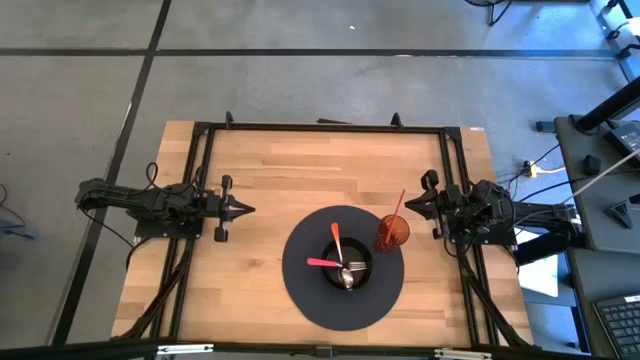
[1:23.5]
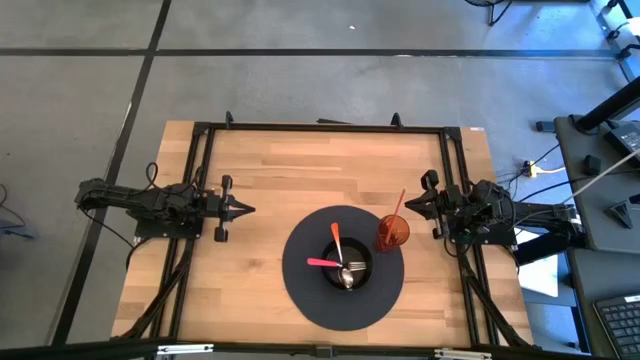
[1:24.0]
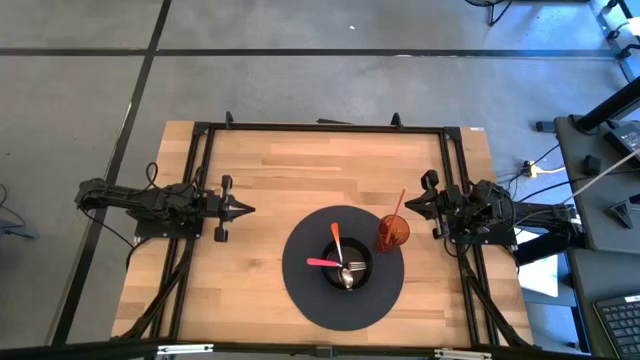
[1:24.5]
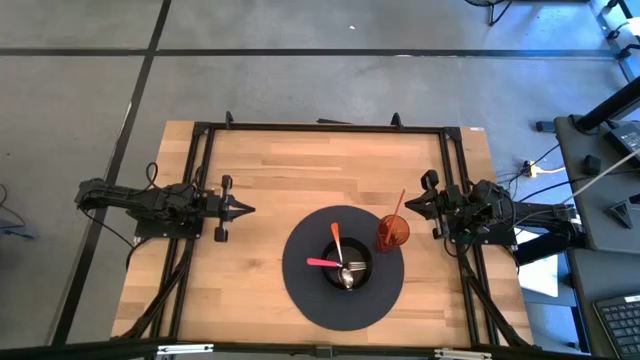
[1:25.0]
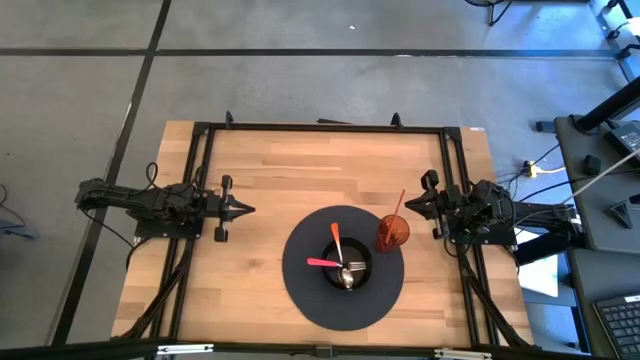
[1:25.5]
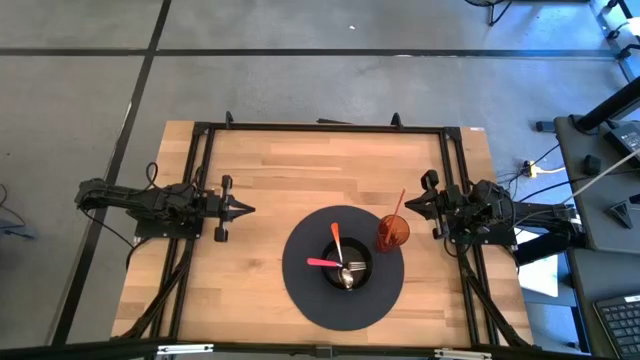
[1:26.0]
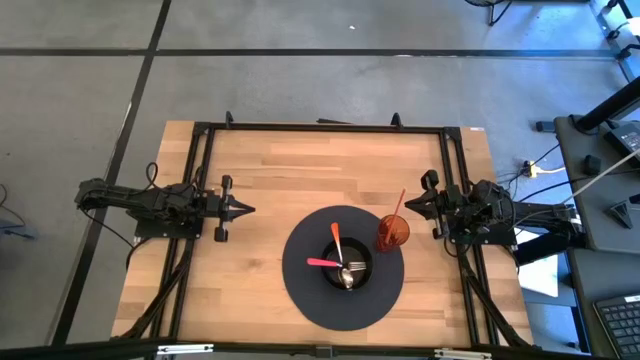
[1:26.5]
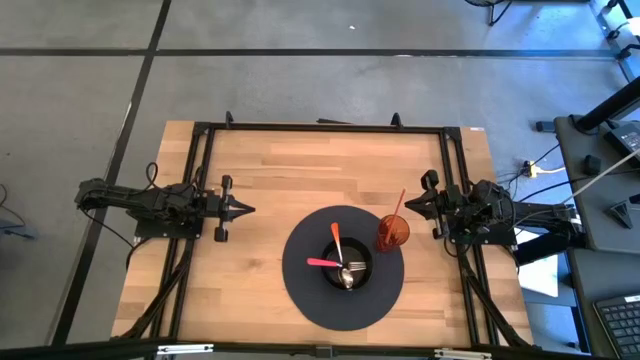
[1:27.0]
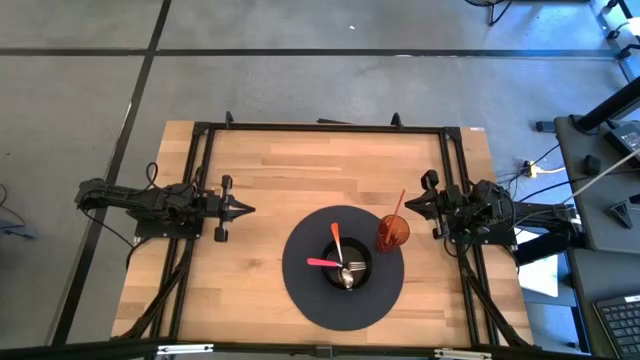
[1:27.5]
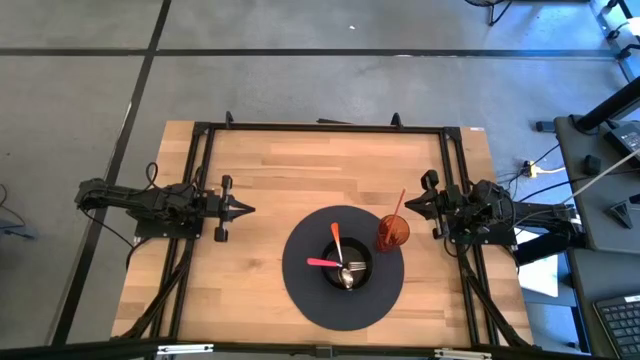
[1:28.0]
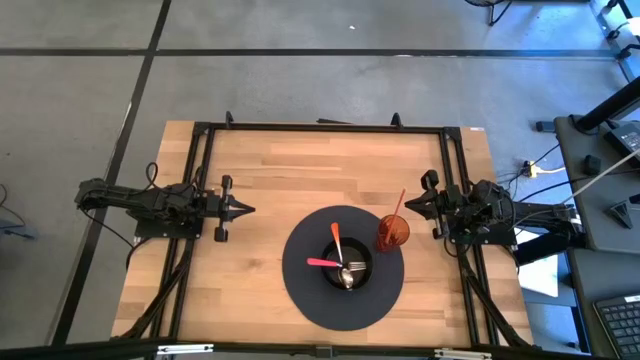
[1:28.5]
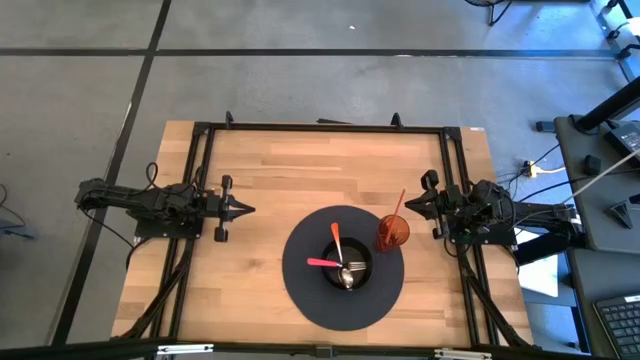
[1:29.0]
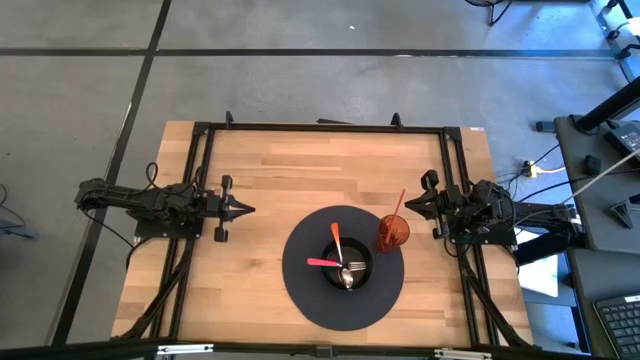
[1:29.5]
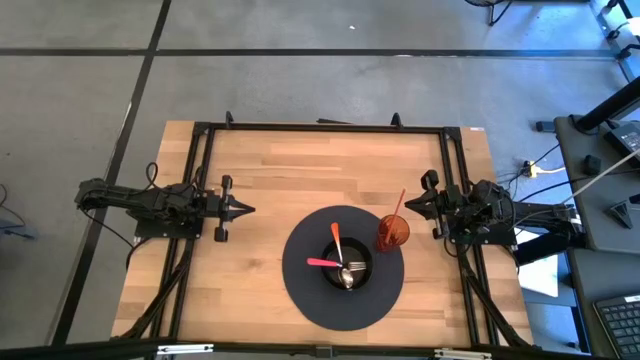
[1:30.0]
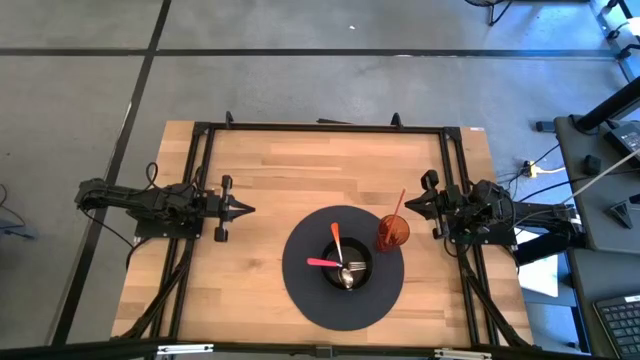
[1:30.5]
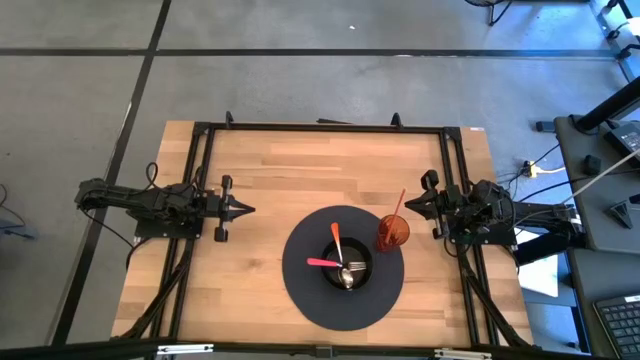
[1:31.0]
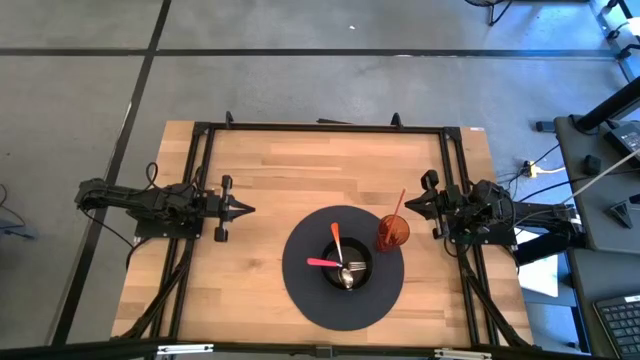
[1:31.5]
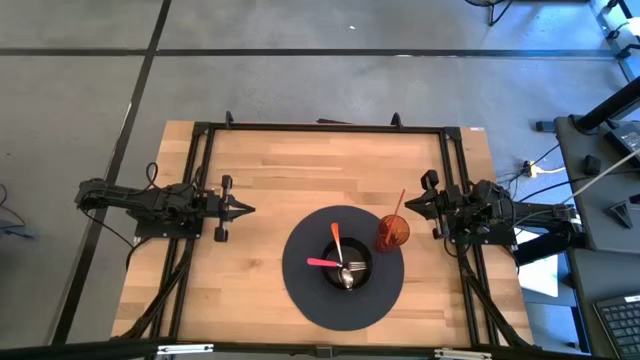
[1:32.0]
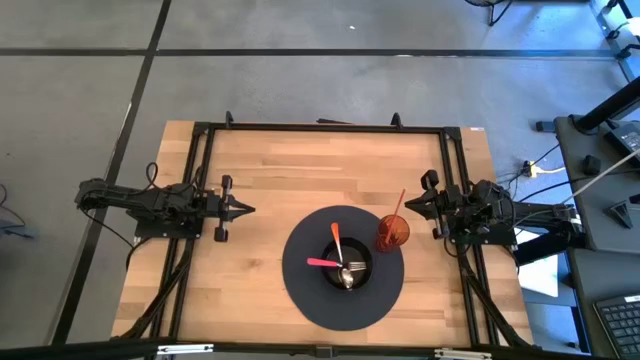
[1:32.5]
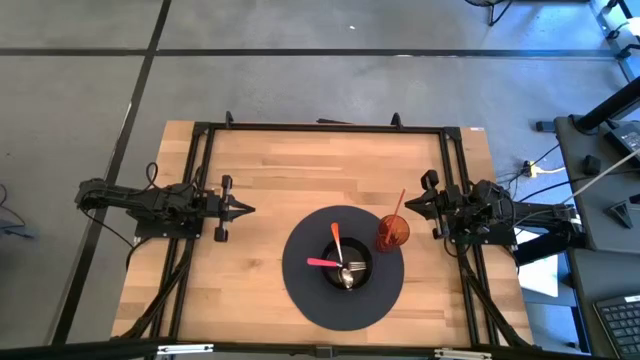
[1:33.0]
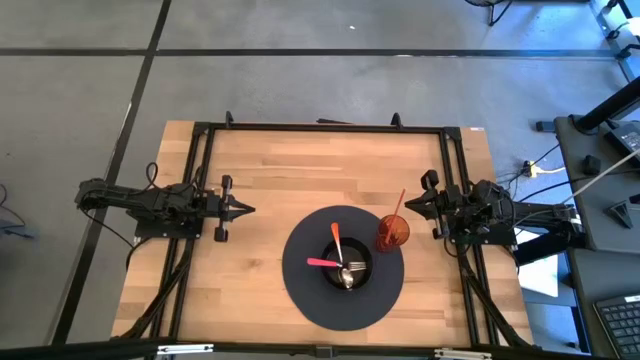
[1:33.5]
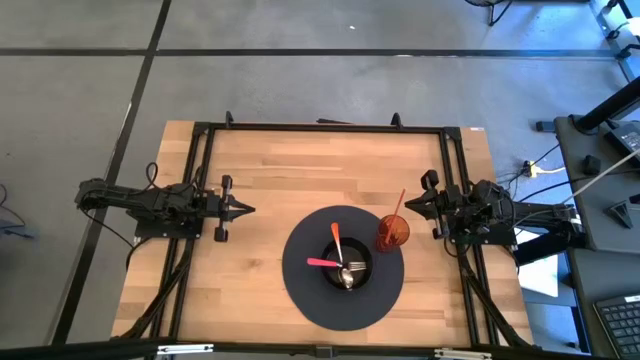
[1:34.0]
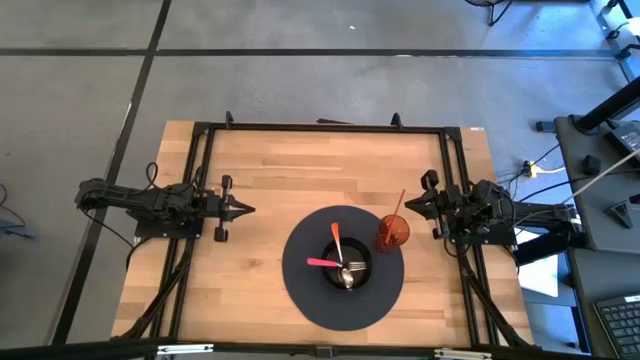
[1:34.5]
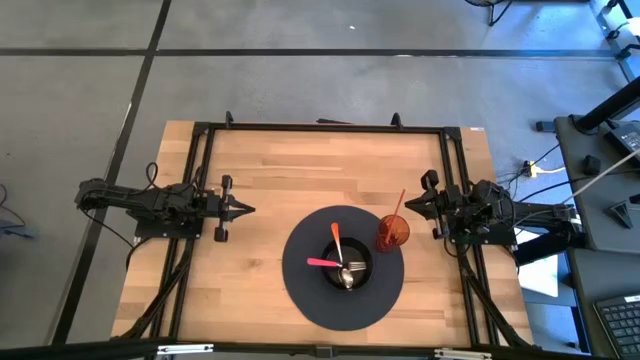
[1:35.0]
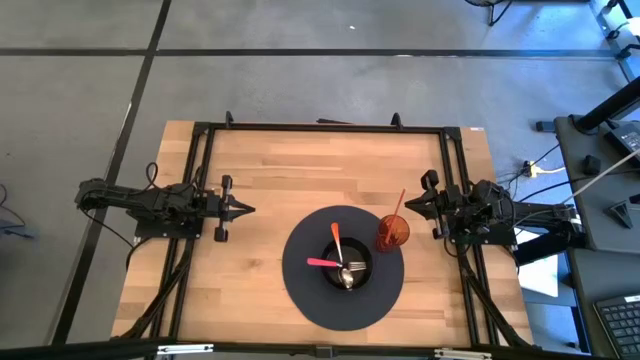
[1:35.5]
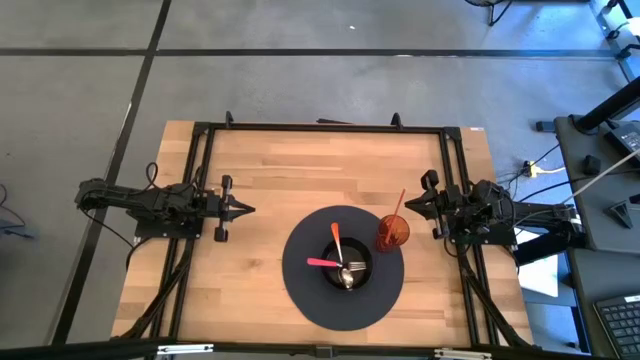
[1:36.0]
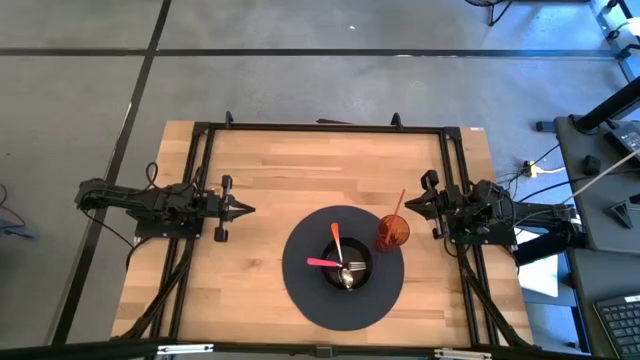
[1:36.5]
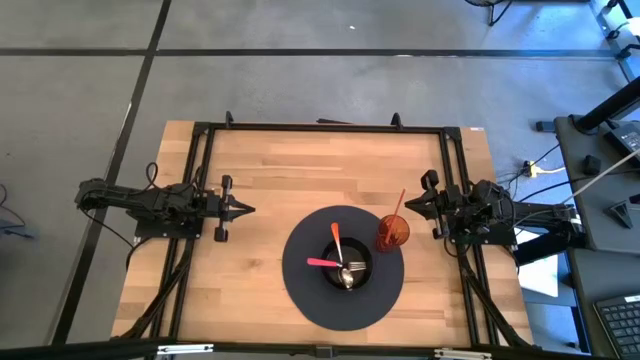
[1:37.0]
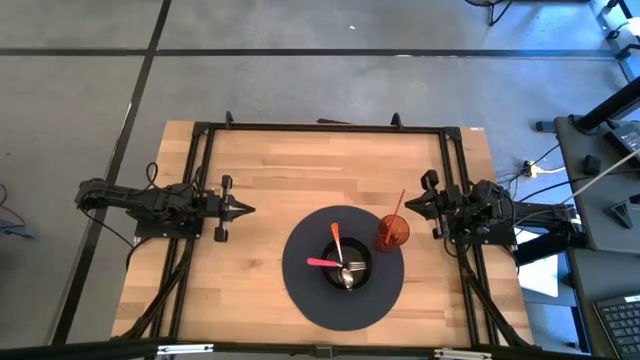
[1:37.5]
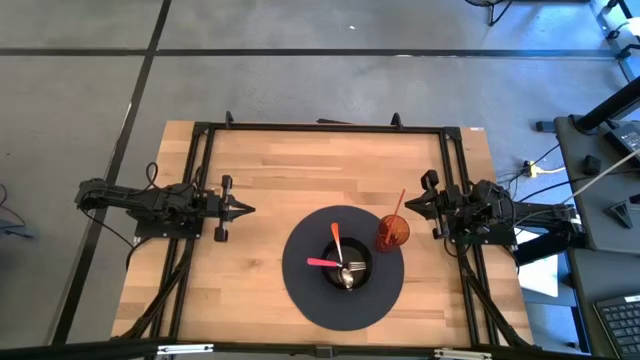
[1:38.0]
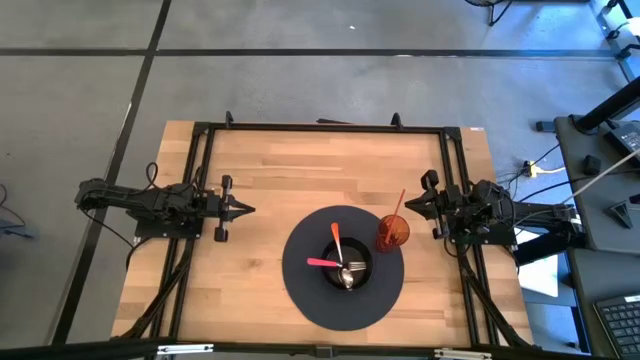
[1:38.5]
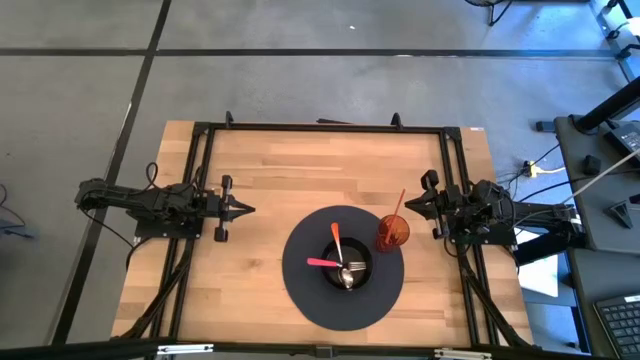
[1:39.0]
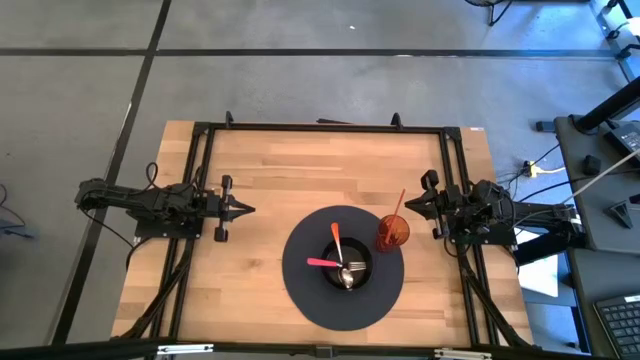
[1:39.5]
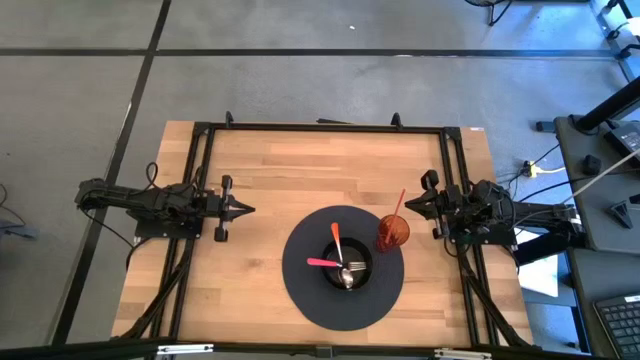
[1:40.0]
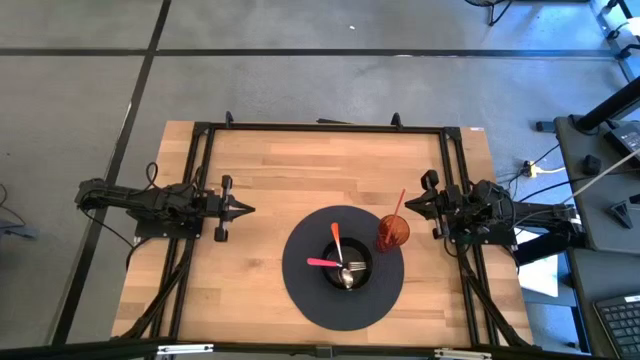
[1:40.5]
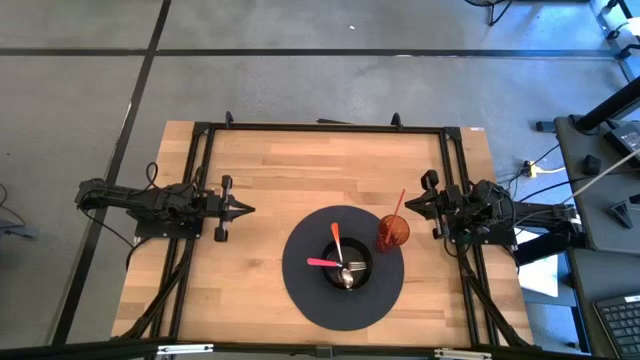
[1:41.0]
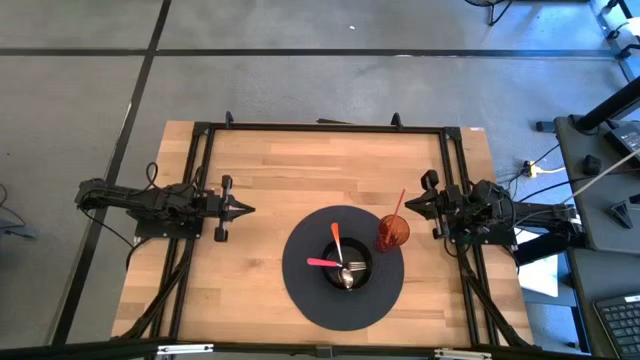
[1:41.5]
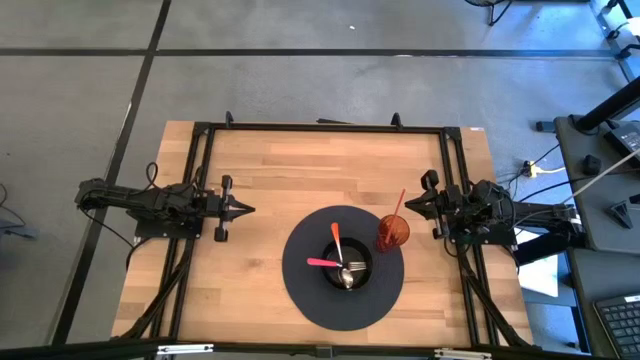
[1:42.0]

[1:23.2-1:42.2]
Task: Pick & Place Utensil
Return to Home Position

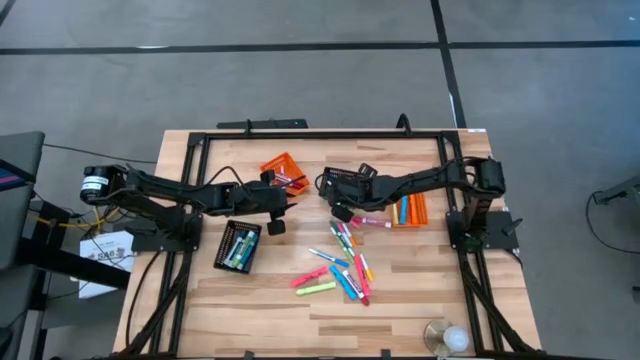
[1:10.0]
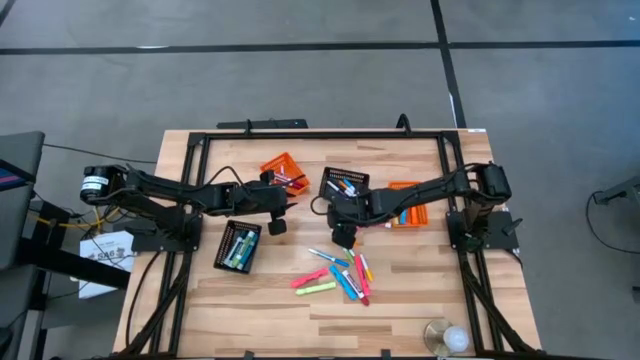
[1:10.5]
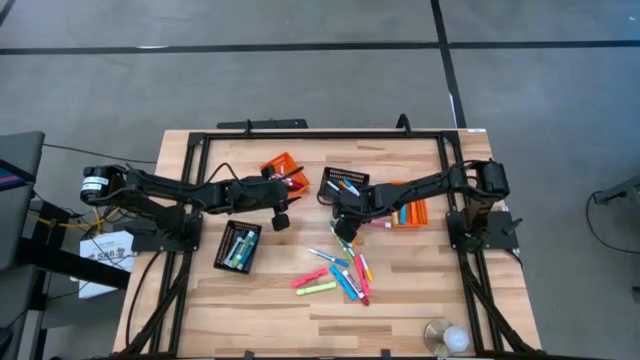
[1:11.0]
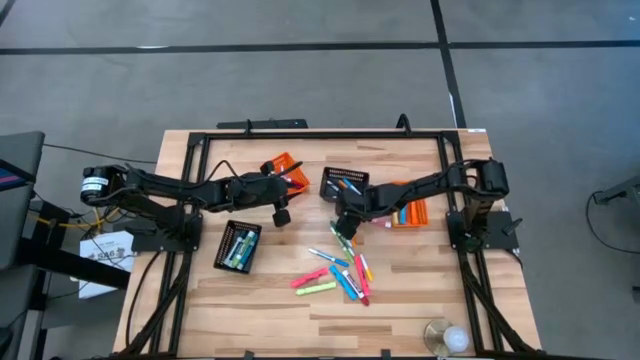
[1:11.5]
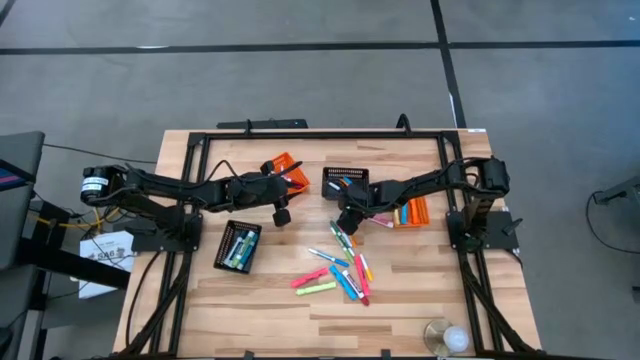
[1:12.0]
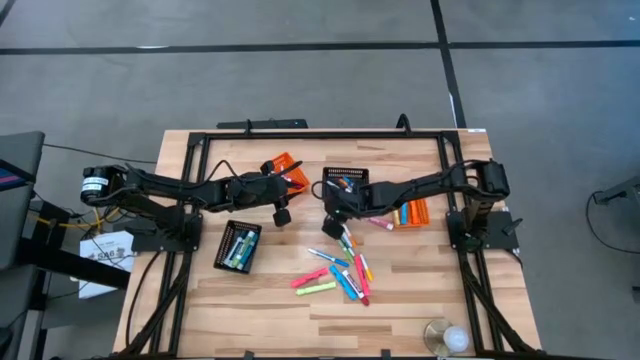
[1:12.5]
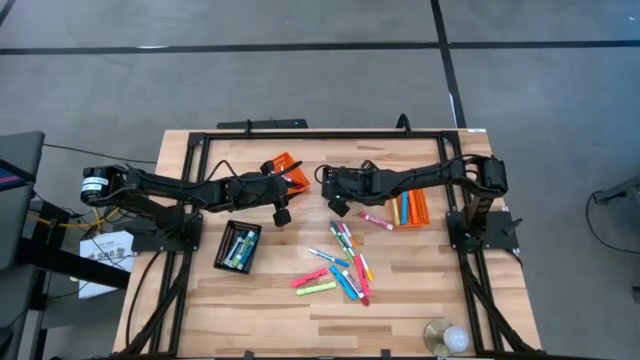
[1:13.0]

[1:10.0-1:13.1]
Task: Pick & Place Markers
Put the pink highlighter into the right black bin
